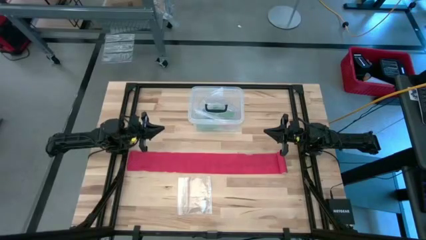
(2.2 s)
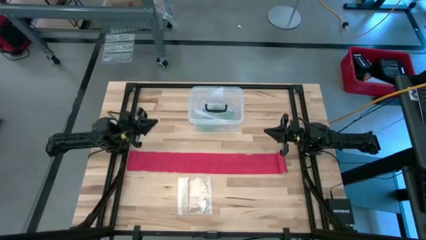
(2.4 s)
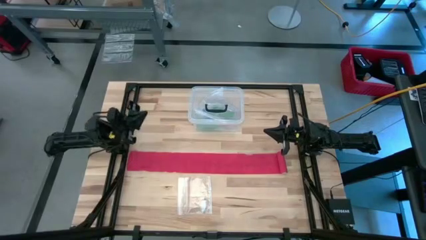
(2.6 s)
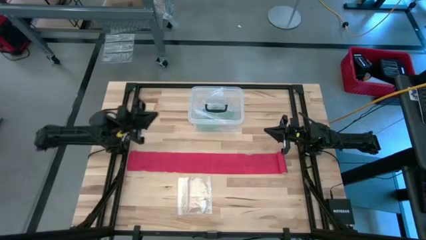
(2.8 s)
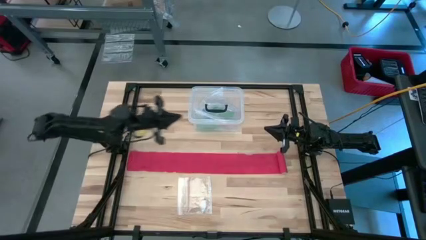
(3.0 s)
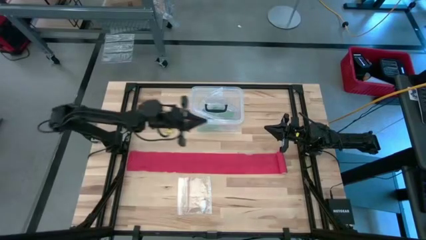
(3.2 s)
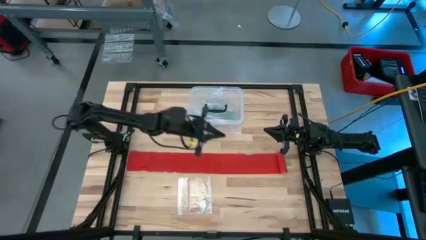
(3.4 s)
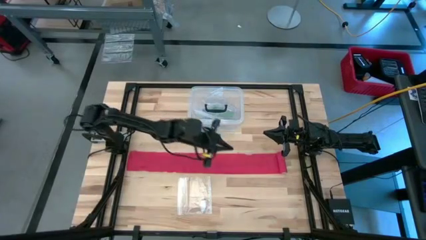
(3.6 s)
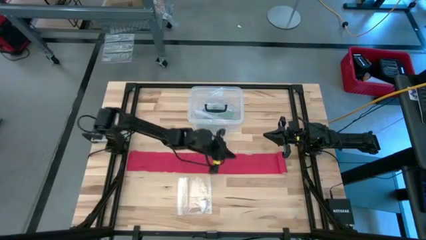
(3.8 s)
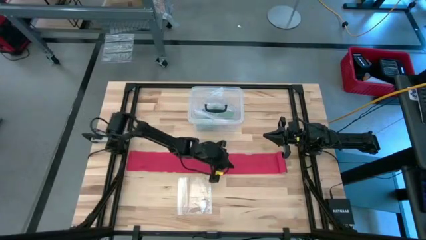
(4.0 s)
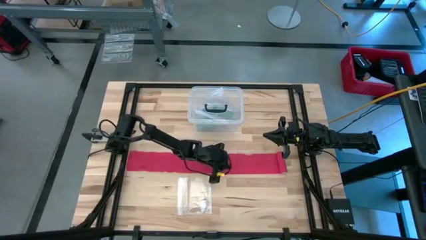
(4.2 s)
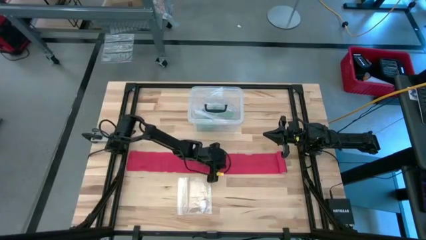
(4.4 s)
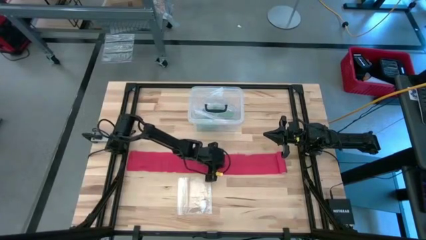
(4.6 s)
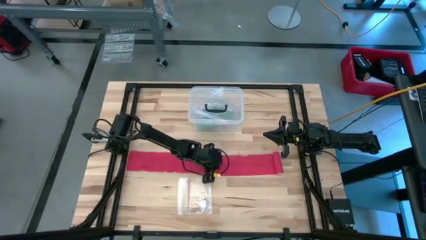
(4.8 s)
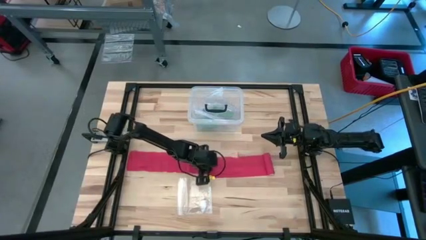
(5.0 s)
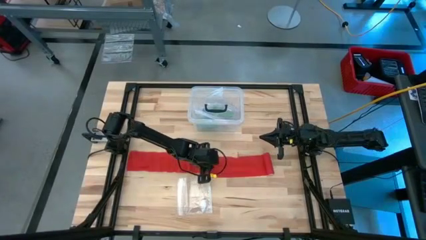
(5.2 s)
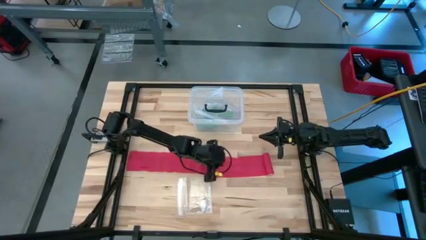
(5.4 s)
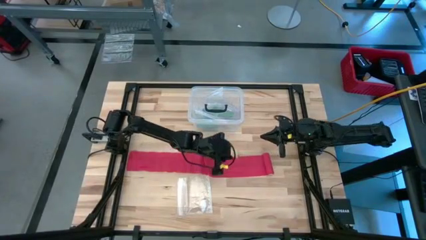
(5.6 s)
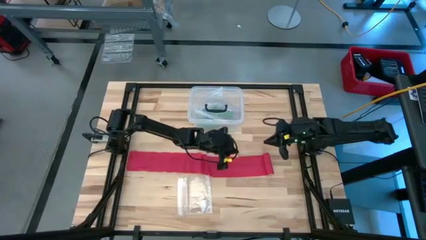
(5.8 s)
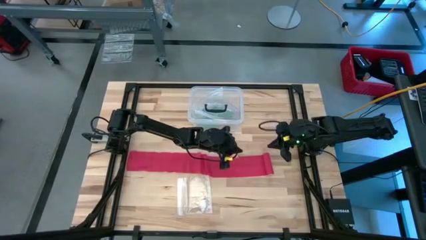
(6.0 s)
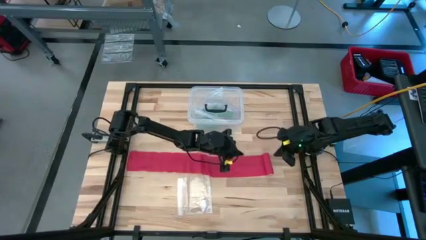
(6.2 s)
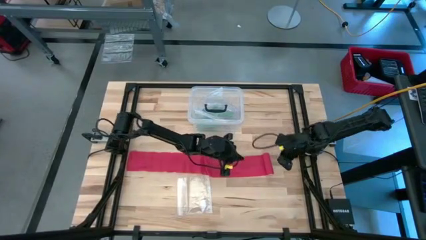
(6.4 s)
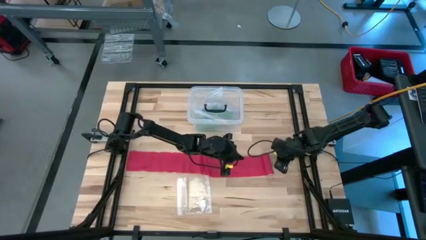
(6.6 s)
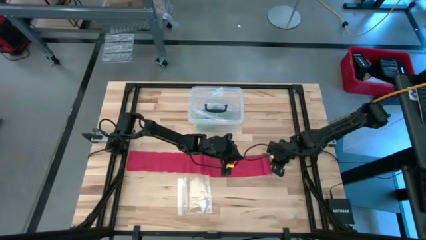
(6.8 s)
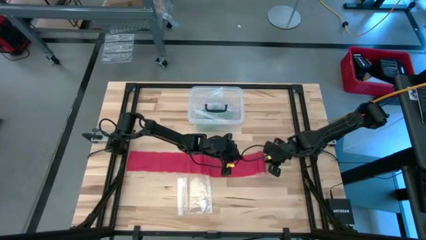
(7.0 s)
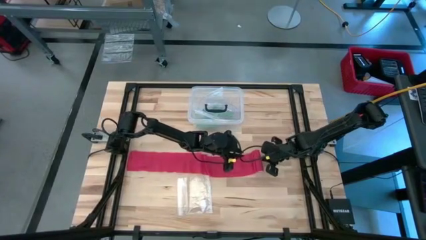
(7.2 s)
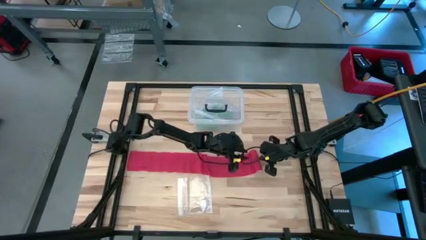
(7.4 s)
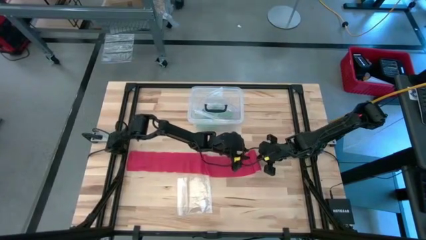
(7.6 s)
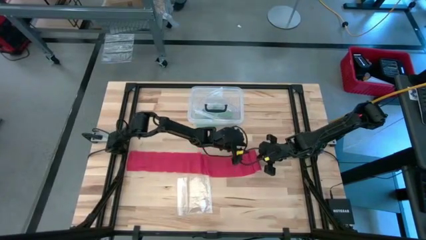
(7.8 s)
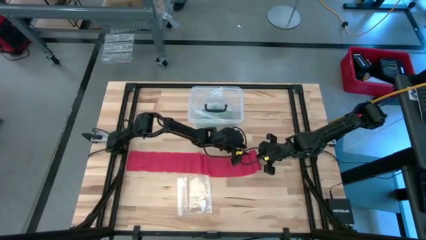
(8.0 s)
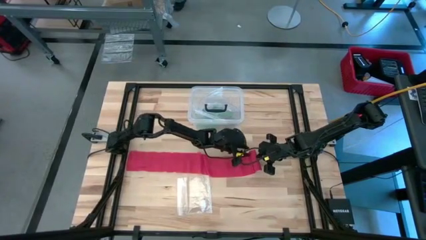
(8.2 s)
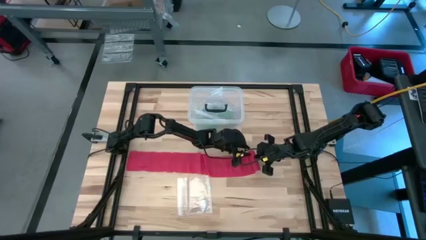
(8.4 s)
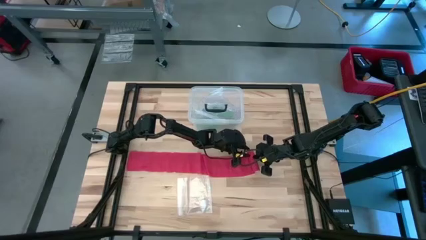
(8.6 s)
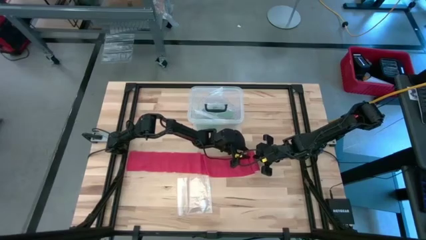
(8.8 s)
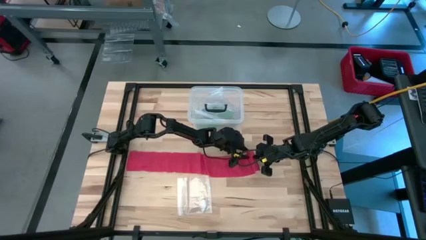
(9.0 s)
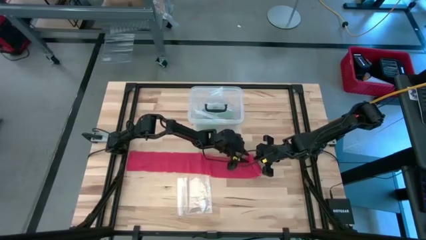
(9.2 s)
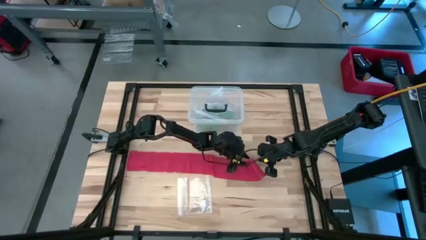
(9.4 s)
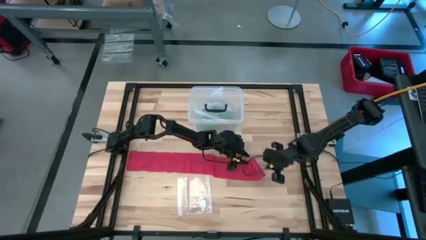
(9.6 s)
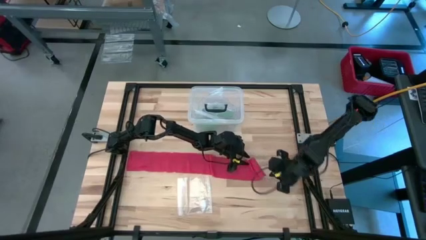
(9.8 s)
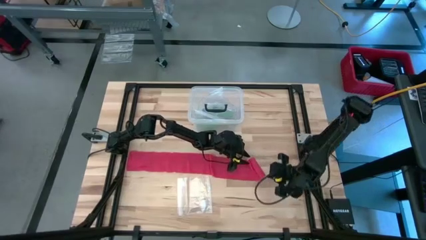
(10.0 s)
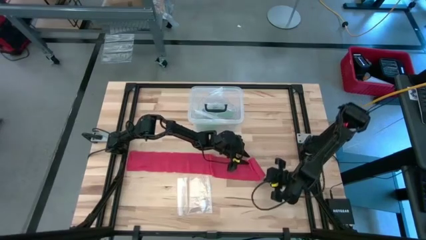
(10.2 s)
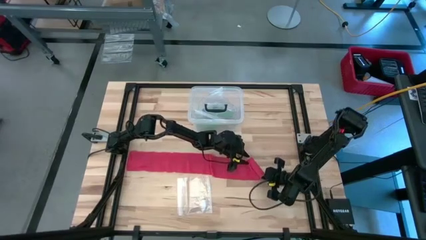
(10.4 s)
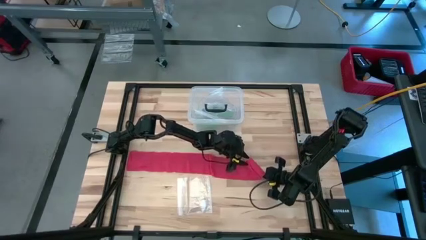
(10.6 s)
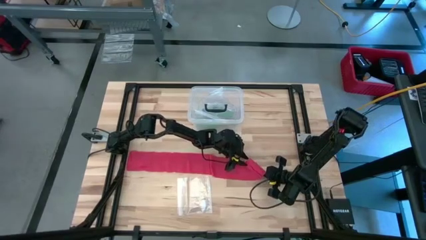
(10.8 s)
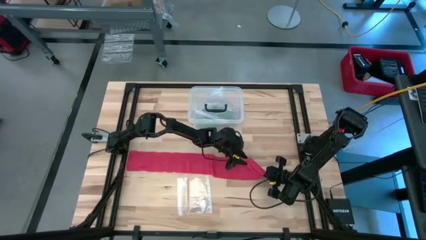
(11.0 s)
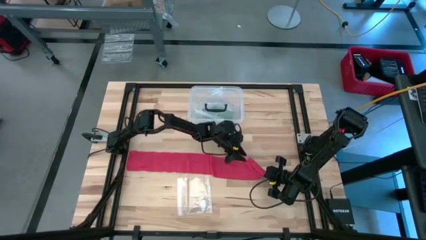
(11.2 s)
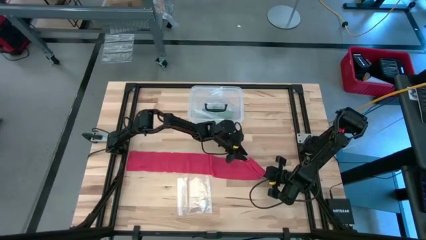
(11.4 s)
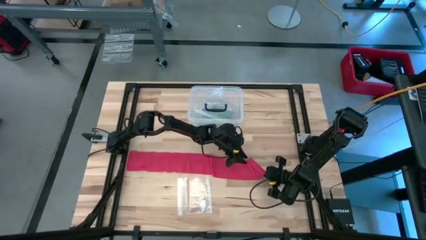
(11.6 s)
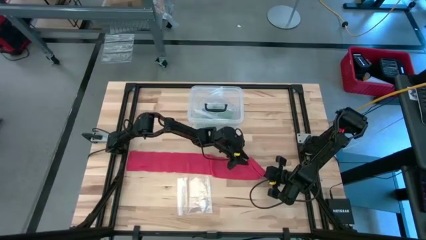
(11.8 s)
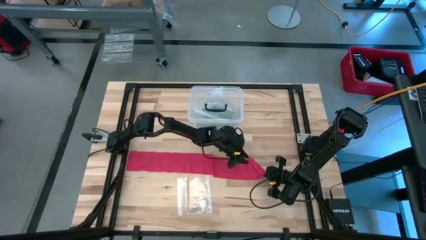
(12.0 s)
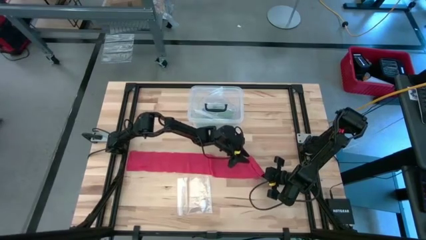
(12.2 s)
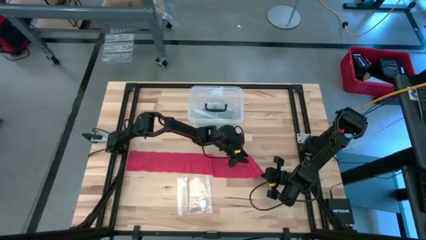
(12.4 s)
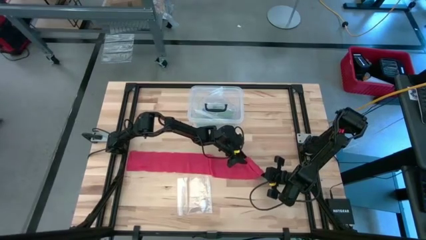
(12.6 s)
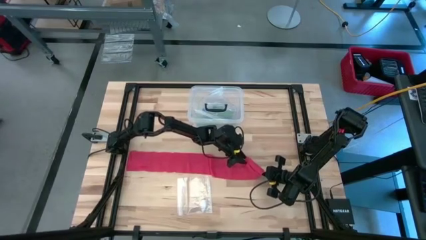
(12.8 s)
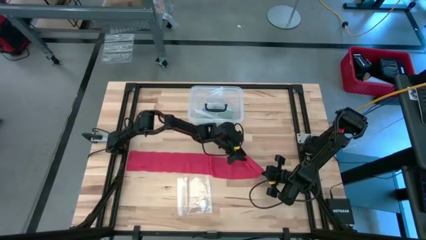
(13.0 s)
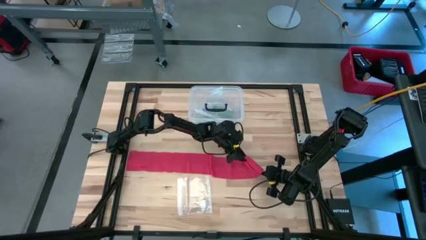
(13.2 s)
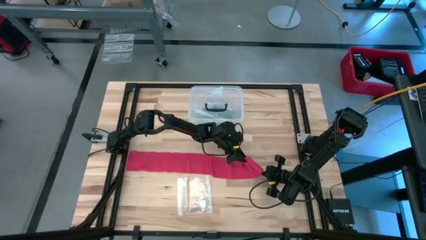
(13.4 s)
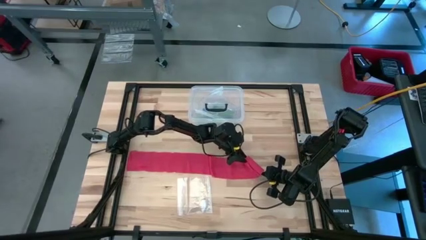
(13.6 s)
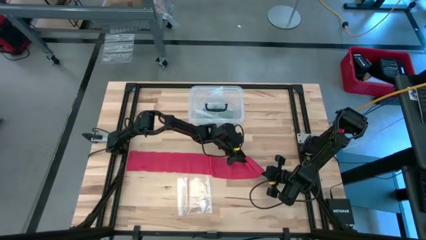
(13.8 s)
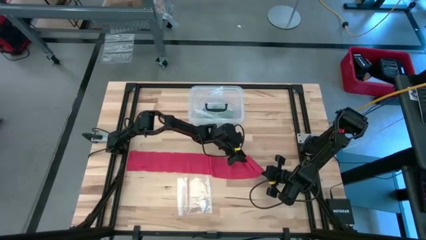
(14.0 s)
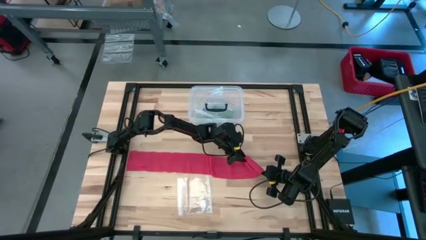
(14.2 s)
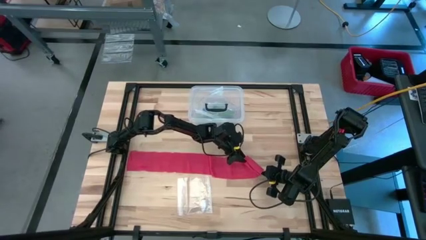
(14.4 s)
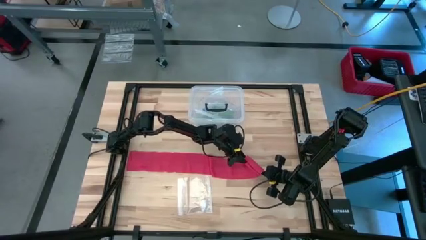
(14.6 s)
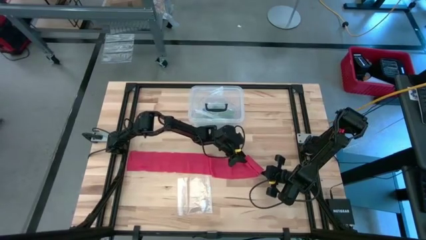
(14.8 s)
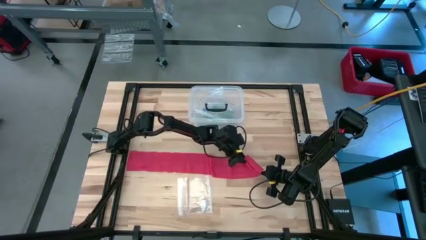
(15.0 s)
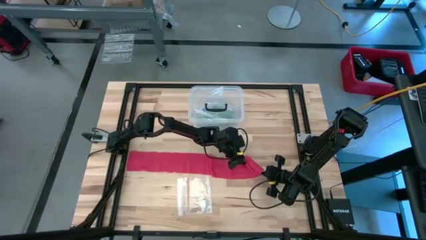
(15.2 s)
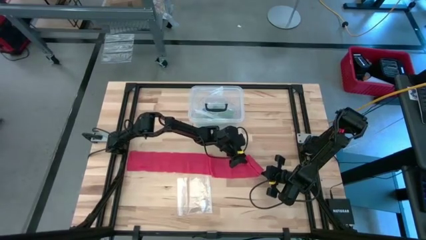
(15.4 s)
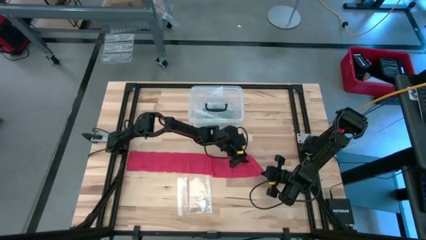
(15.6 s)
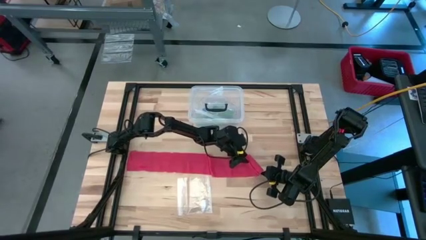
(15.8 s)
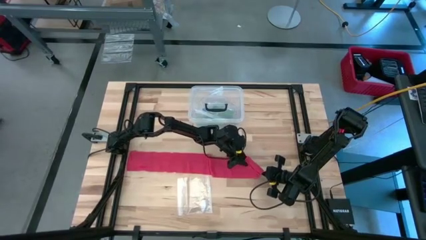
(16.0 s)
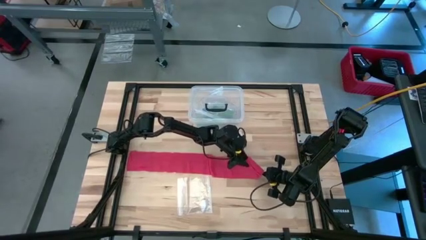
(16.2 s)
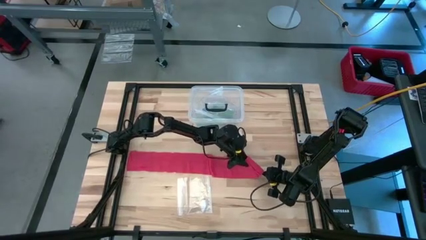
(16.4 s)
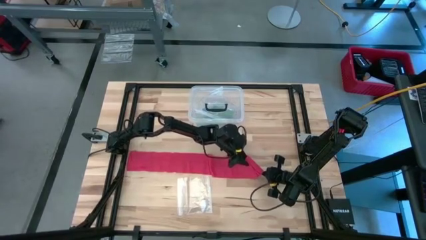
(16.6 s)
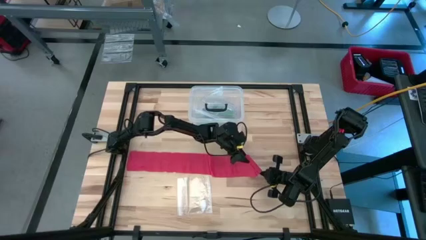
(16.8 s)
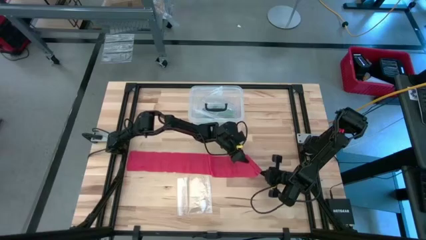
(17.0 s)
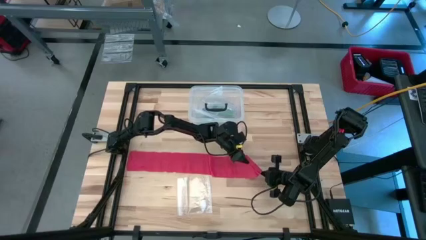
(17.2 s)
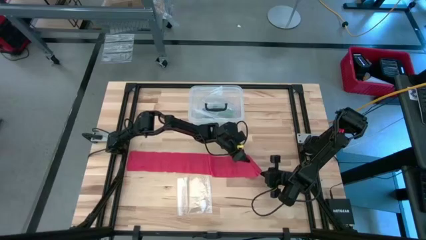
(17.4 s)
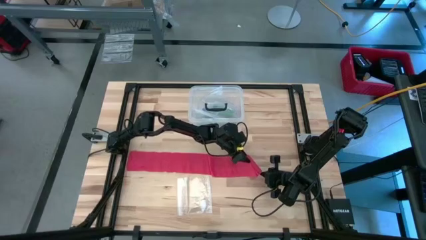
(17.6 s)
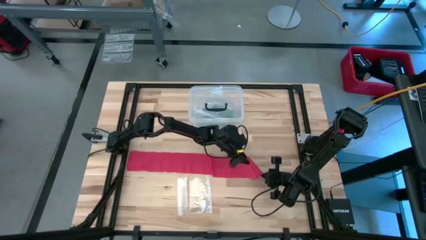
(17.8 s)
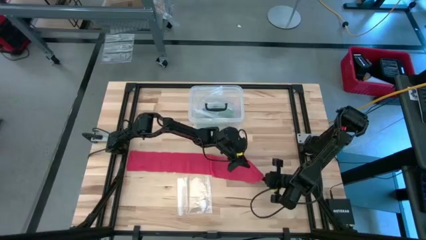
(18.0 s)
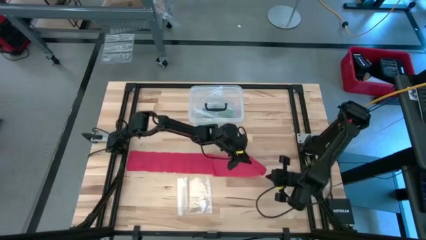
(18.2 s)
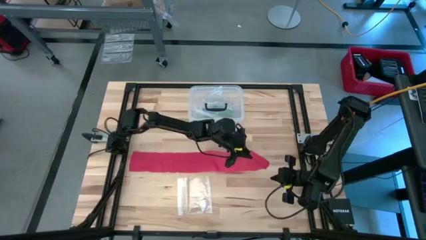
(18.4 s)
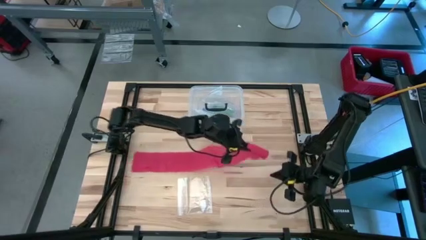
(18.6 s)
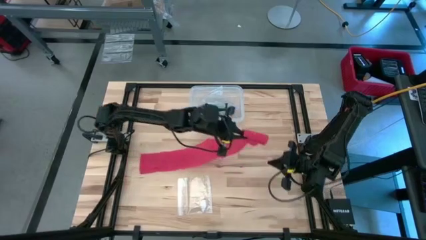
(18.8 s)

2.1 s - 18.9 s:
Task: Roll bandage
Roll the red bandage
